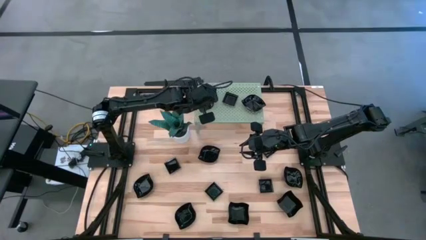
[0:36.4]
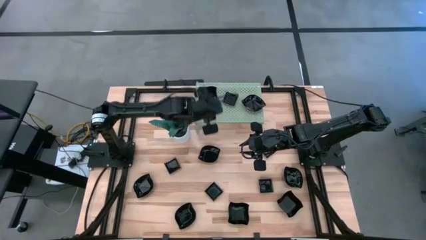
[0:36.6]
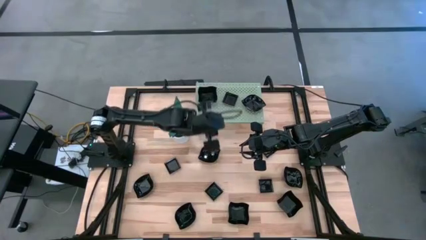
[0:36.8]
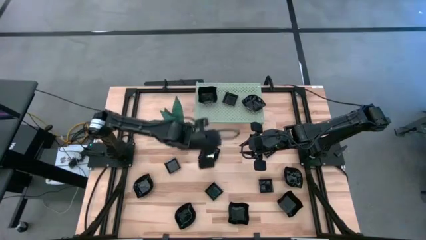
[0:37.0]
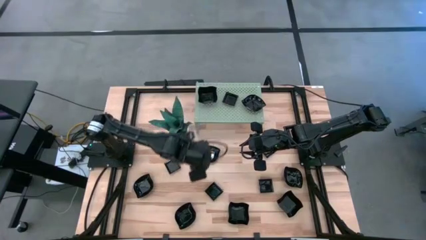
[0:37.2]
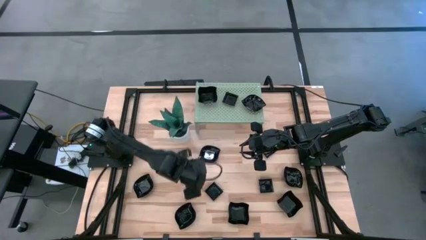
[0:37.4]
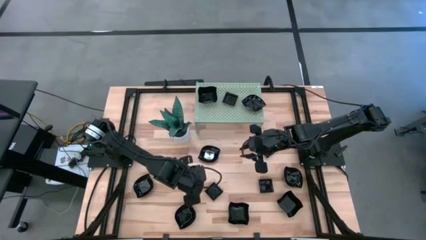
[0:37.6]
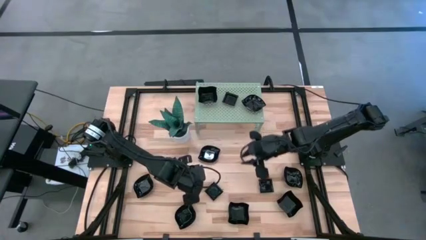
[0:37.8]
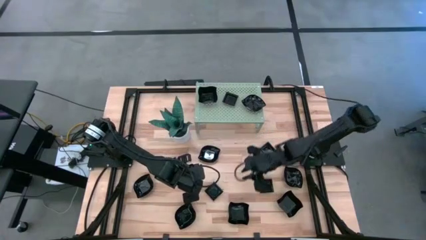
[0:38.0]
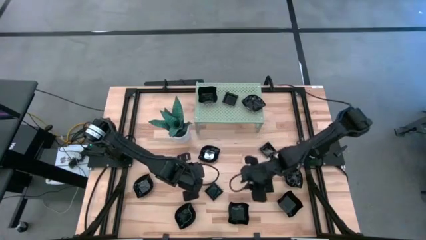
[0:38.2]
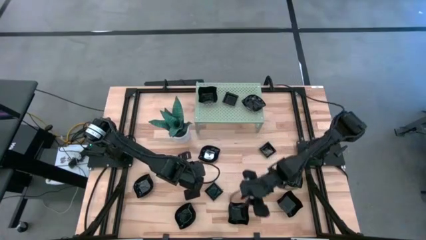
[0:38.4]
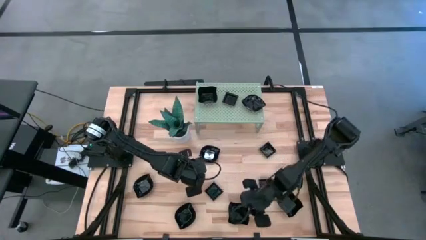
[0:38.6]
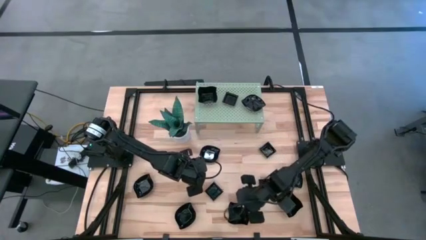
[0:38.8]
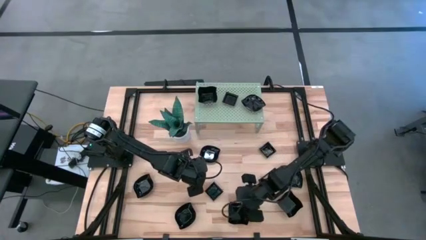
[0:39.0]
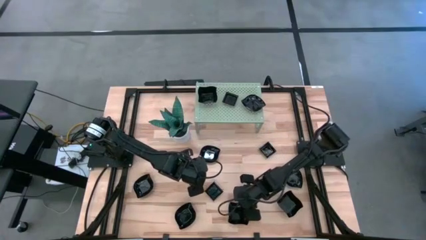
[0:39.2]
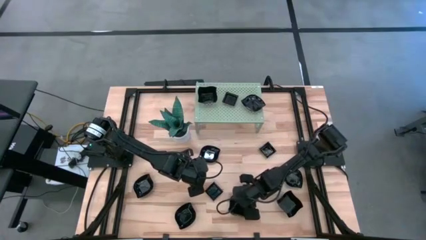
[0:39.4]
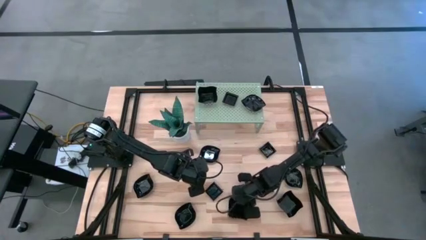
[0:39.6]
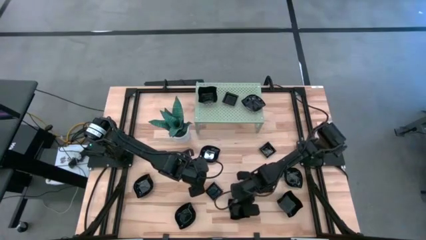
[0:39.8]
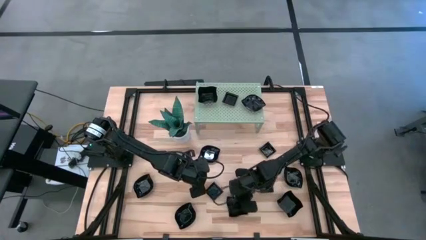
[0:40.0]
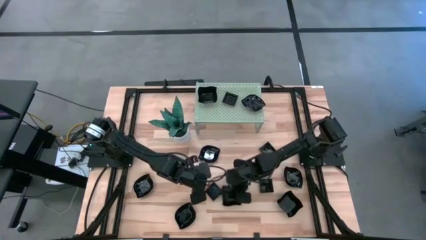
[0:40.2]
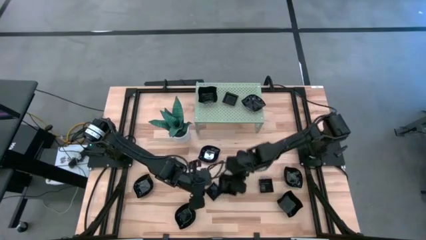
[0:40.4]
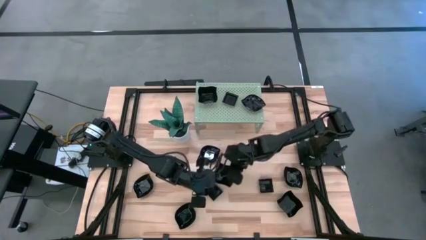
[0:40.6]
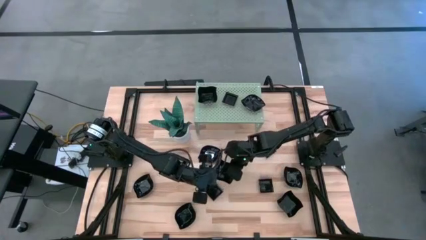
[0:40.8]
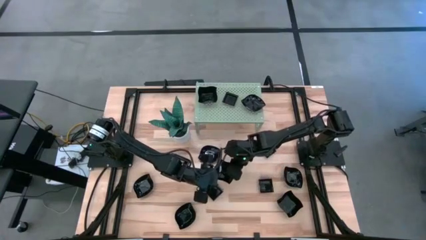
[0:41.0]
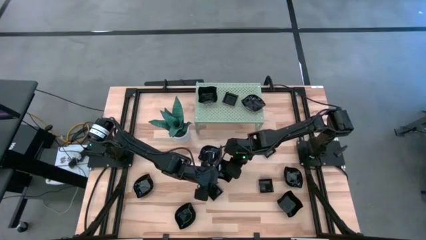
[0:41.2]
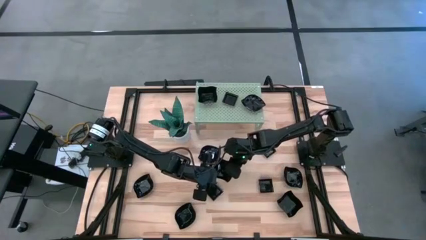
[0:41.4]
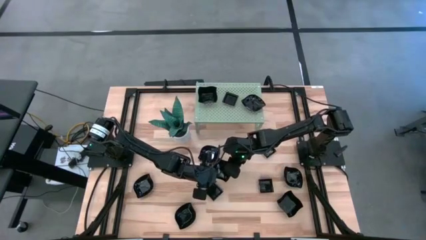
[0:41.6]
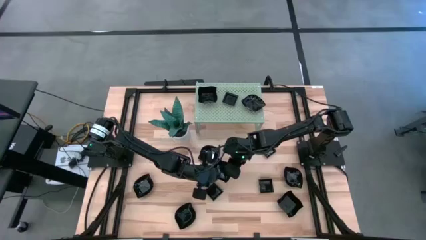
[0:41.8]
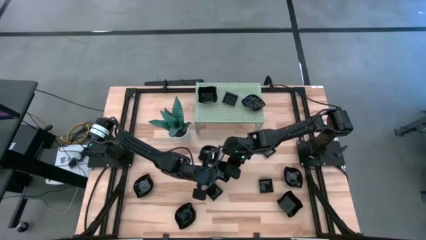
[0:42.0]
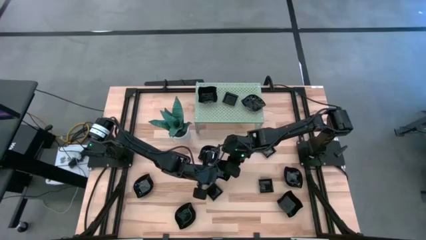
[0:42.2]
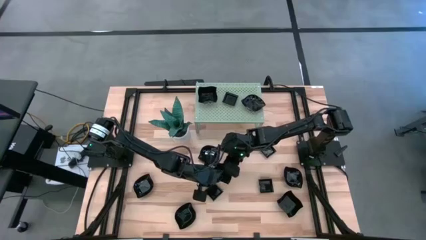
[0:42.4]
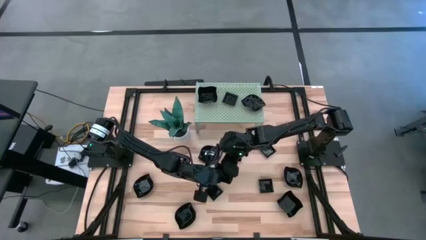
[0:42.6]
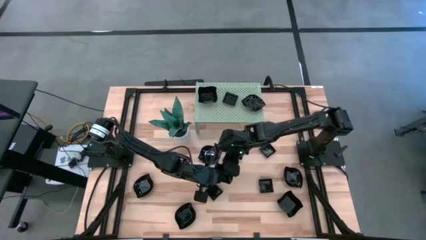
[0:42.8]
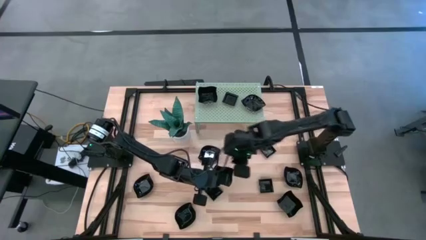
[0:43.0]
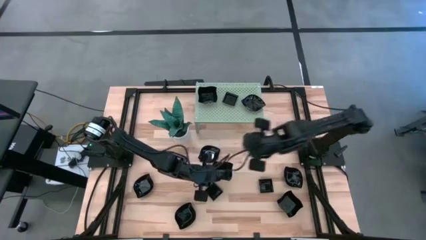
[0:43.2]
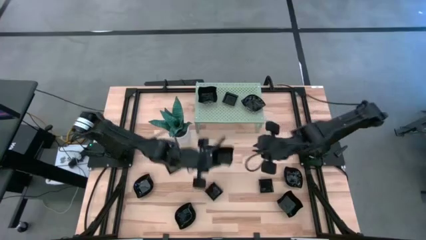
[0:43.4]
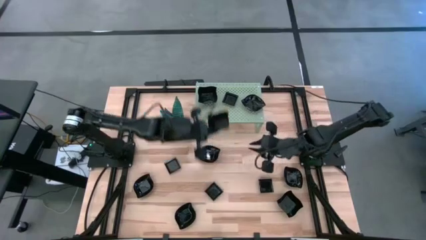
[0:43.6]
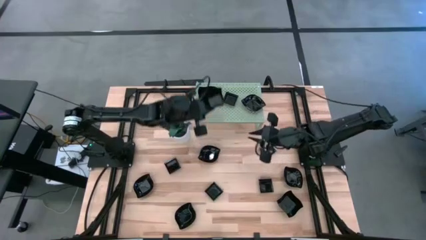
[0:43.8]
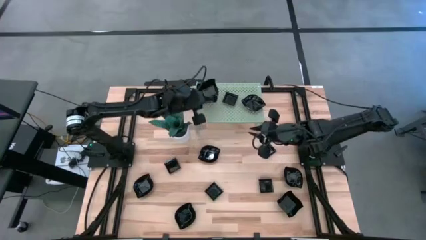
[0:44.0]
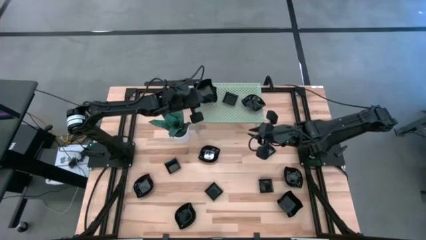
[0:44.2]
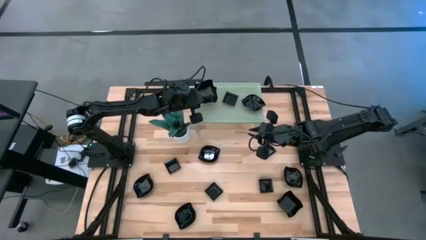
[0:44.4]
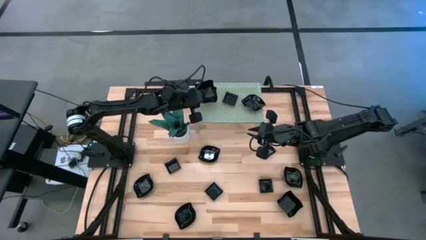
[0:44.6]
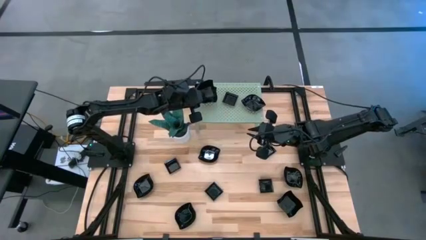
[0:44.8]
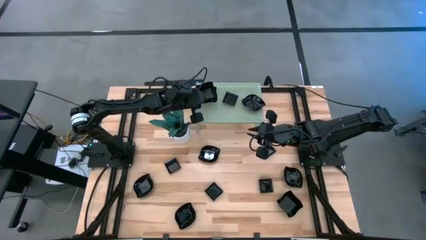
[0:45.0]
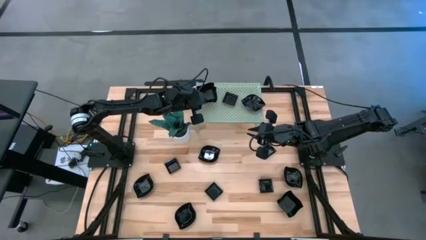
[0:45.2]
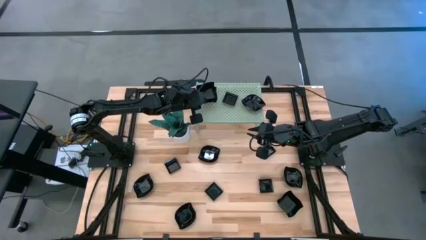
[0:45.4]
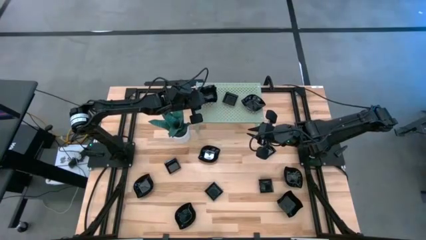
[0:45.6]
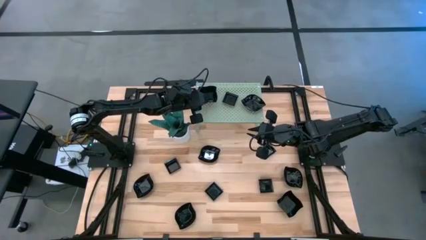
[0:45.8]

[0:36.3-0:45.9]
Task: Pick & Place Mini shaped plates
Stack the distorted square plate on top of the other distorted square plate on the shelf

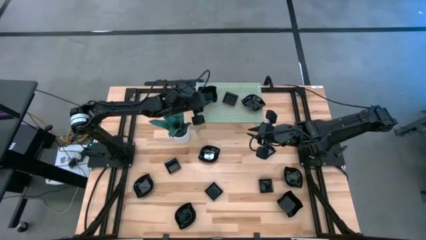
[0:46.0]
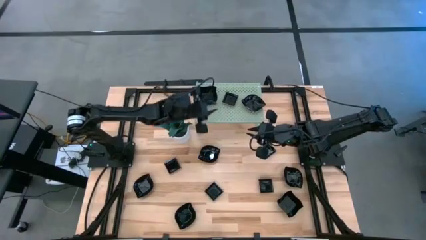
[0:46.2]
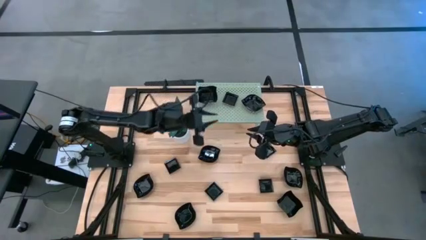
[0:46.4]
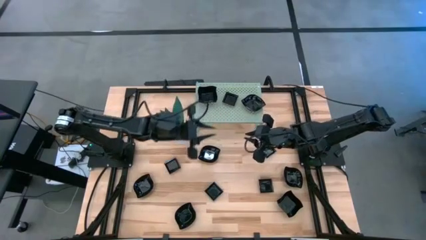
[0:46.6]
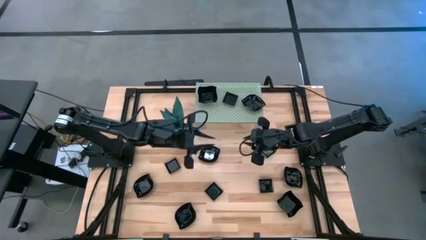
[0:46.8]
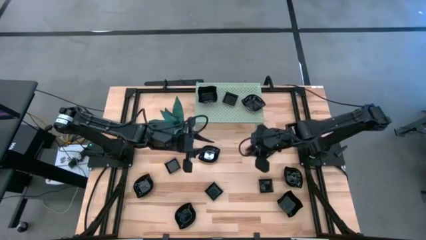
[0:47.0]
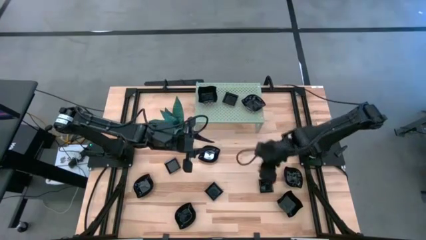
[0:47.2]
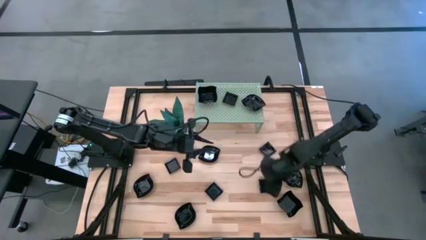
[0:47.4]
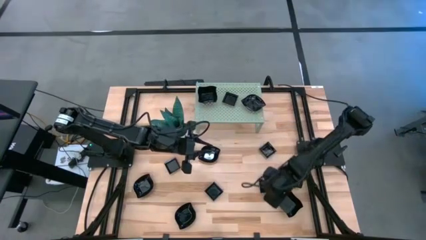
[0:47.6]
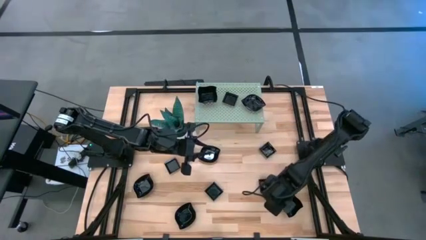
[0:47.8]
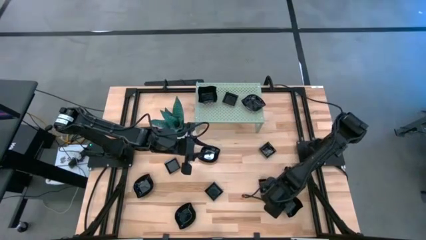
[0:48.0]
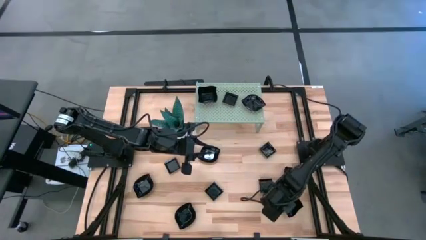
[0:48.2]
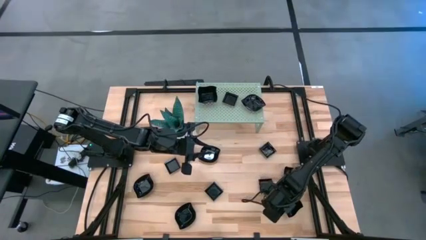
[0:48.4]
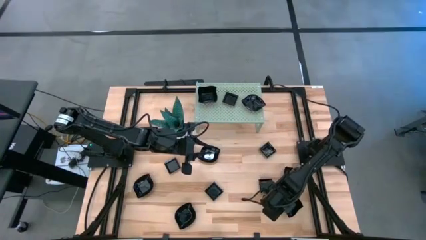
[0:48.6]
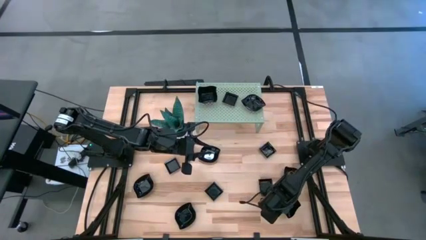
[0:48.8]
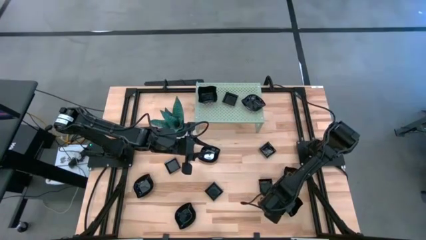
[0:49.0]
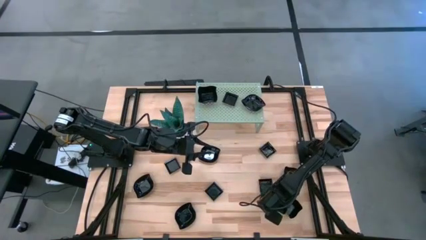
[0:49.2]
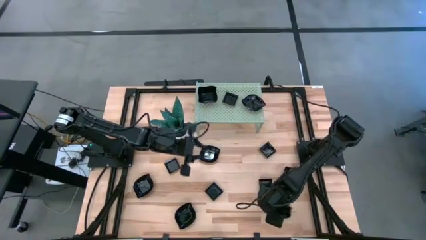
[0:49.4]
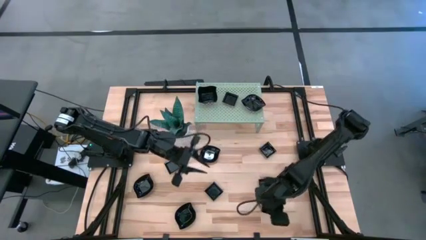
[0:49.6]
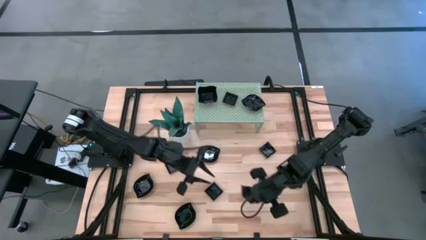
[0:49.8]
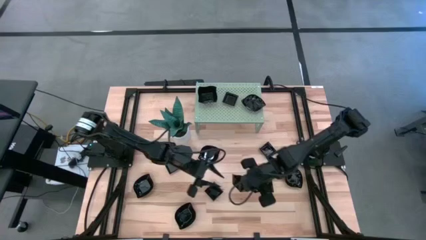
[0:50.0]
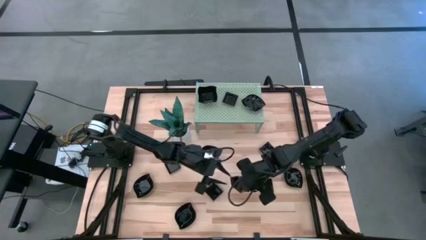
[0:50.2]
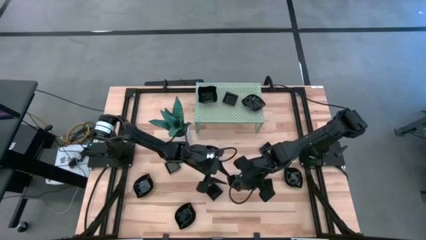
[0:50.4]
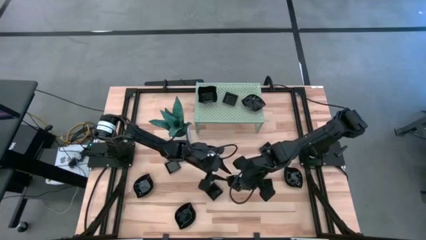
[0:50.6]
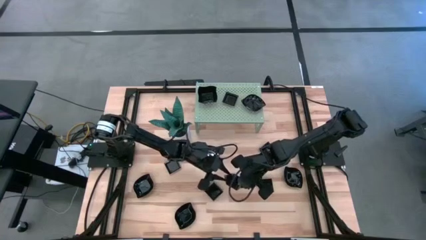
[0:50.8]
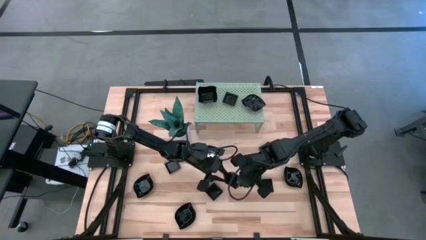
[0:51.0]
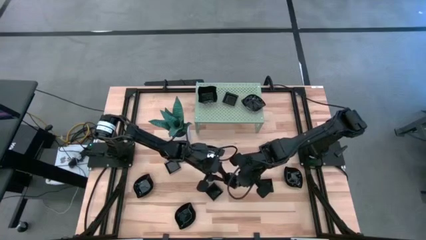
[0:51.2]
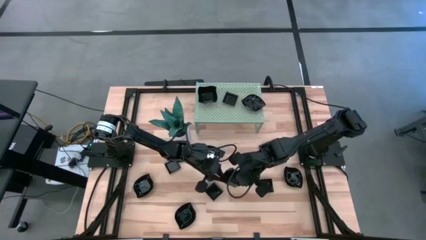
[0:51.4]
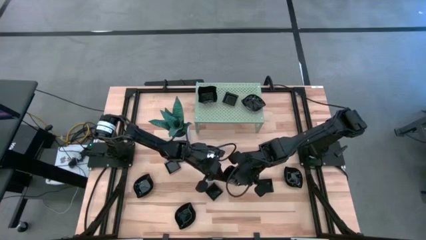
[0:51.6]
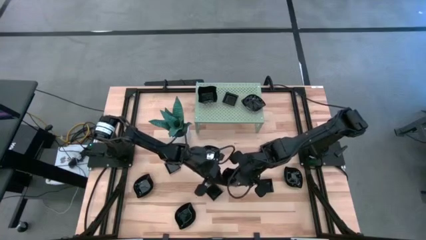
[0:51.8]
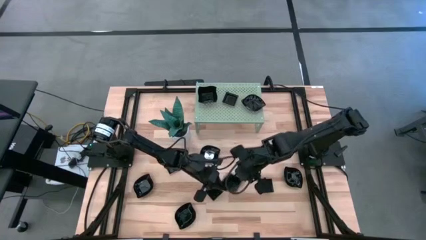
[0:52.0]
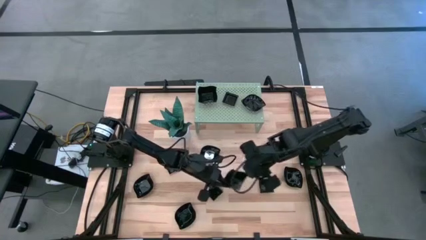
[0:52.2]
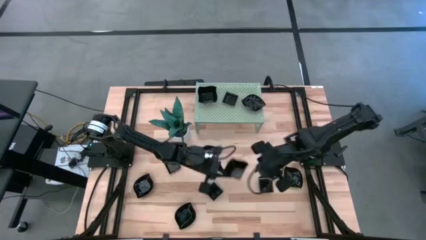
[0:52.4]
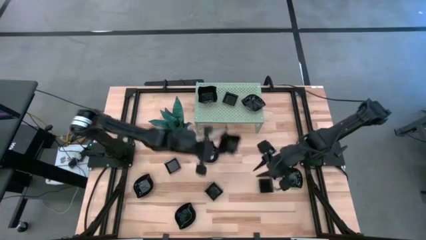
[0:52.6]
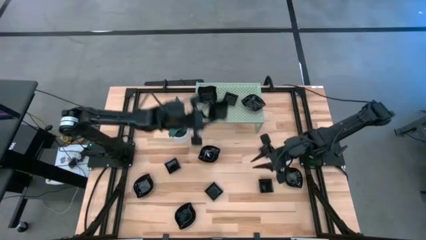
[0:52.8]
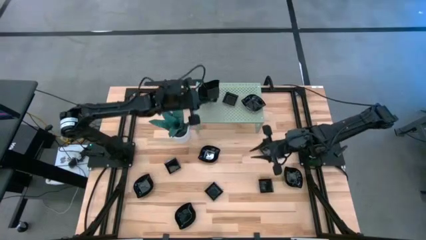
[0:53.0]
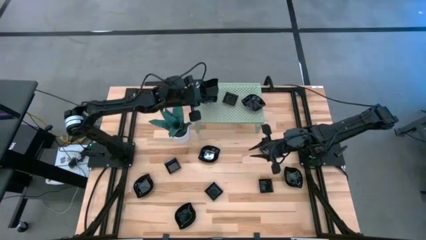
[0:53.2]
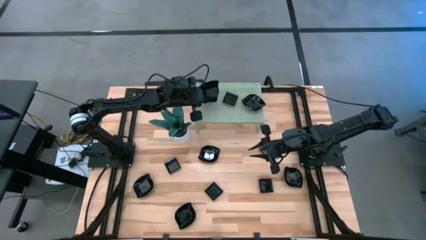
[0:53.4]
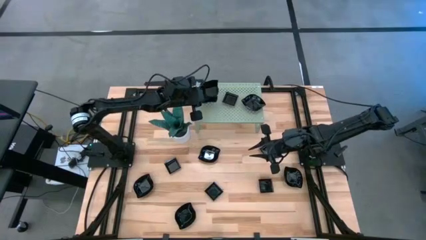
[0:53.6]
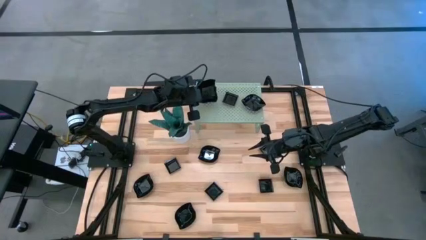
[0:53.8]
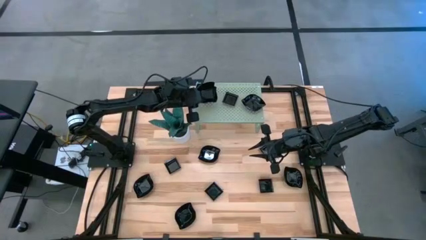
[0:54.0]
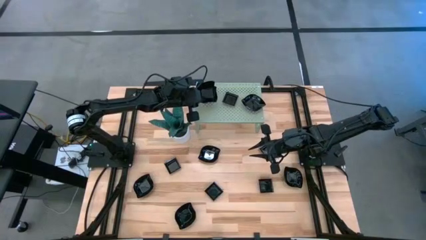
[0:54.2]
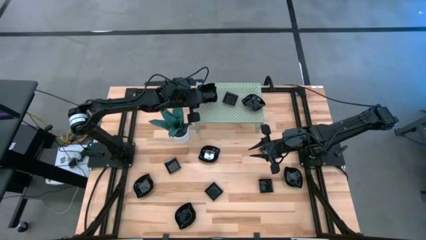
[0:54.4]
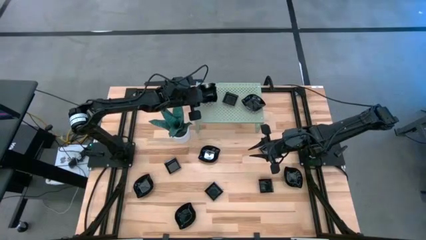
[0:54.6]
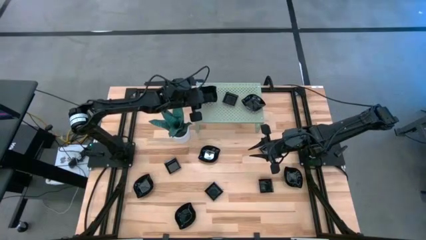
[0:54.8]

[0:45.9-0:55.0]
Stack the distorted square plate on top of the other distorted square plate on the shelf
